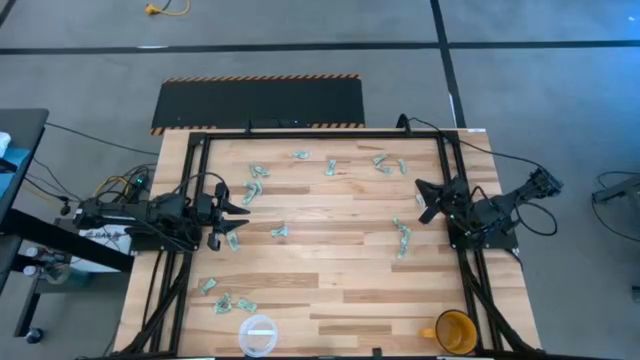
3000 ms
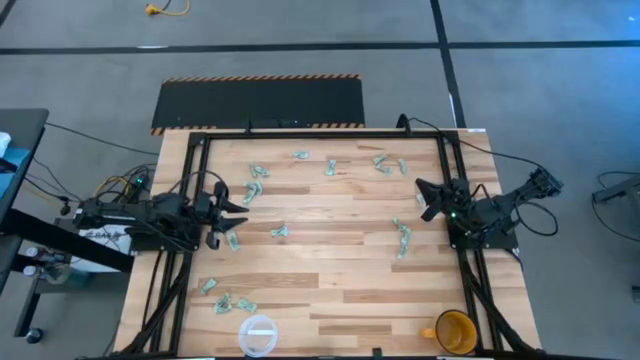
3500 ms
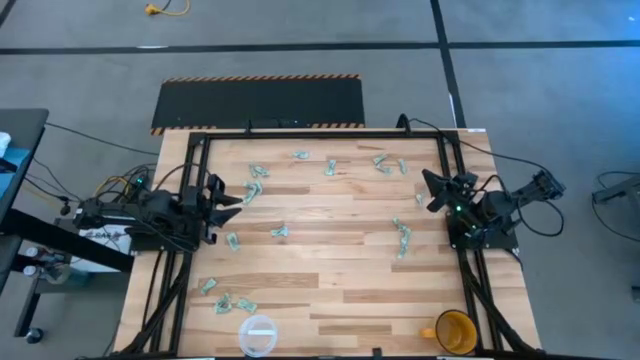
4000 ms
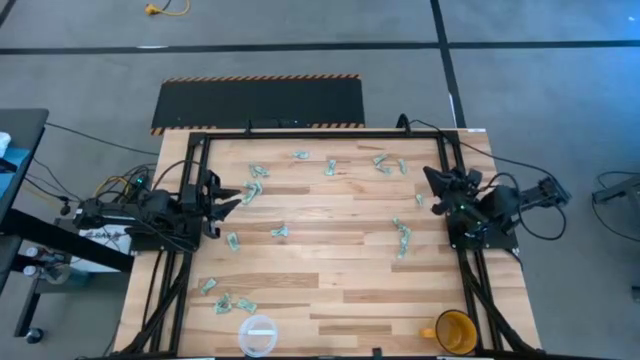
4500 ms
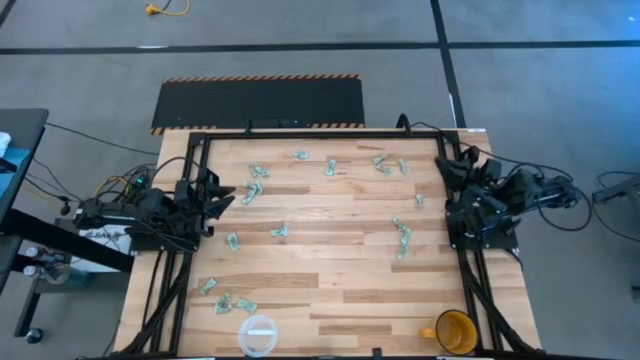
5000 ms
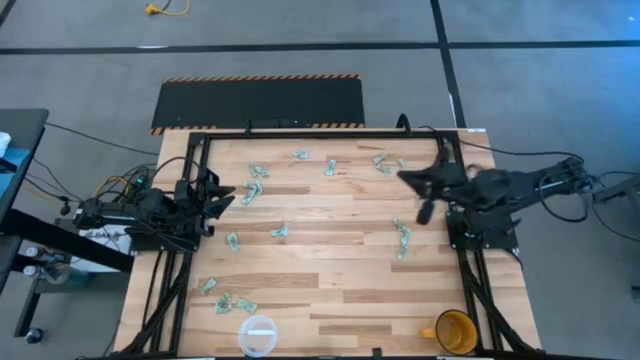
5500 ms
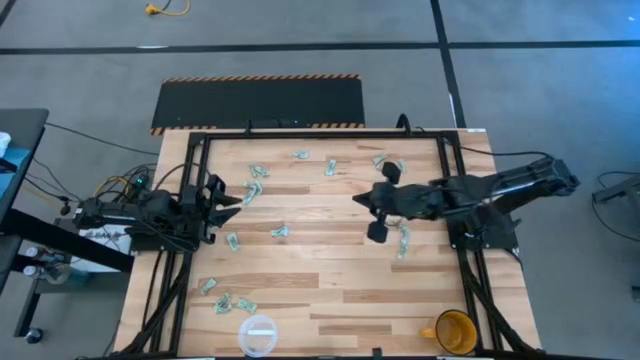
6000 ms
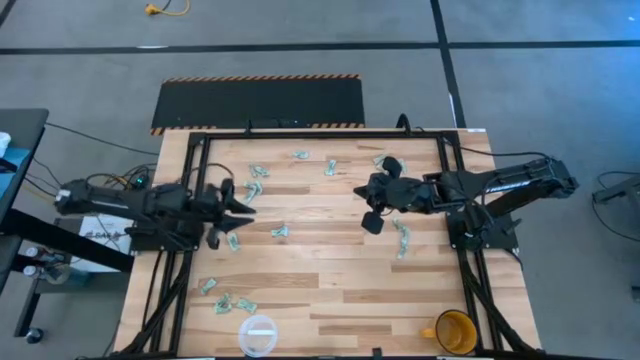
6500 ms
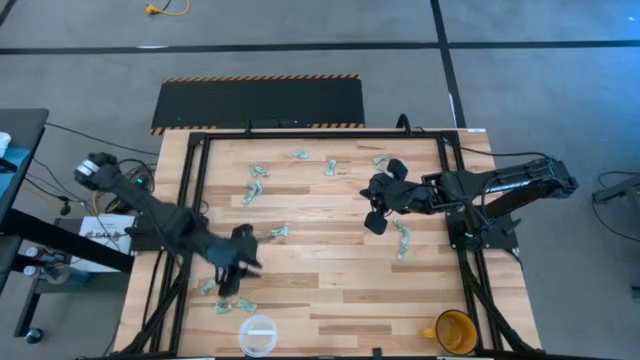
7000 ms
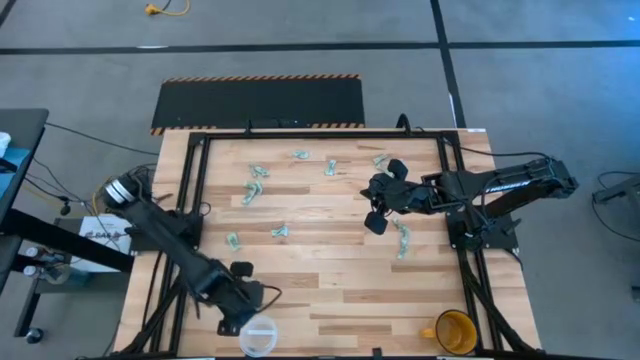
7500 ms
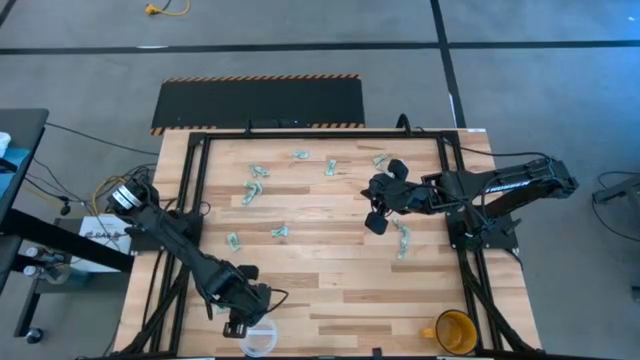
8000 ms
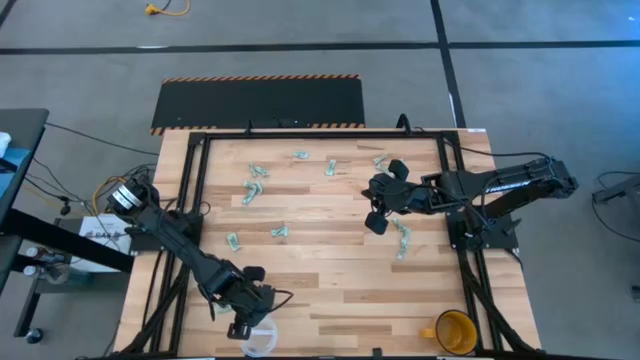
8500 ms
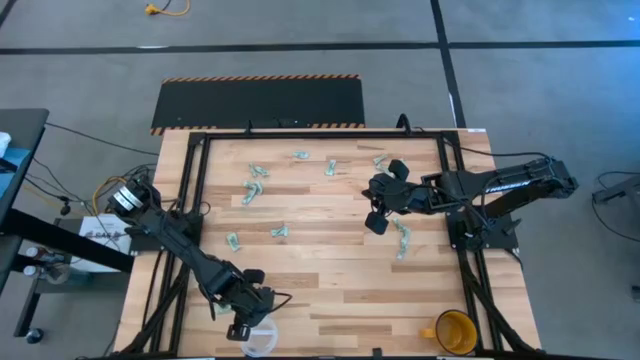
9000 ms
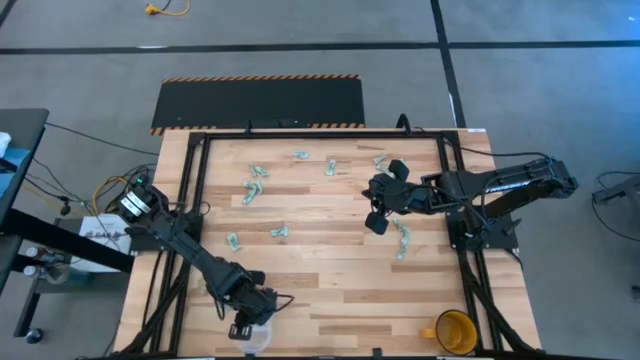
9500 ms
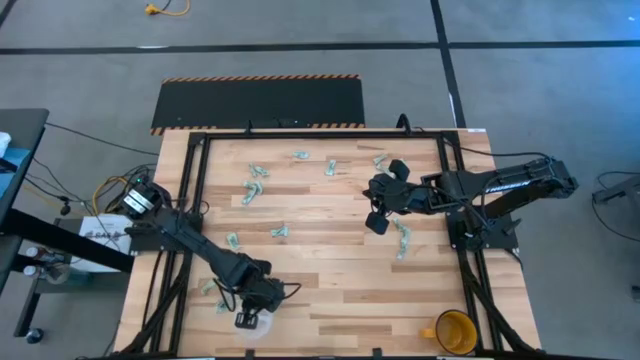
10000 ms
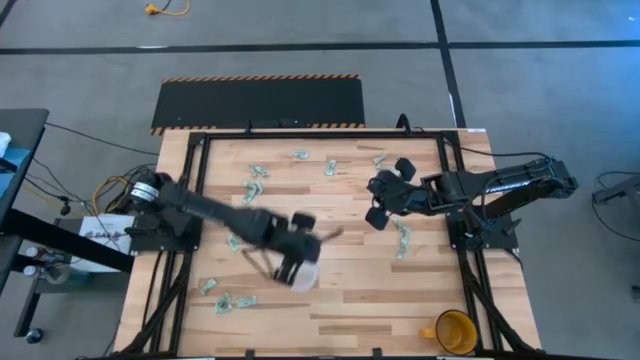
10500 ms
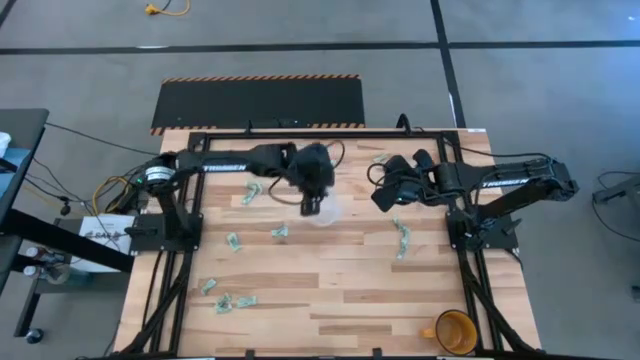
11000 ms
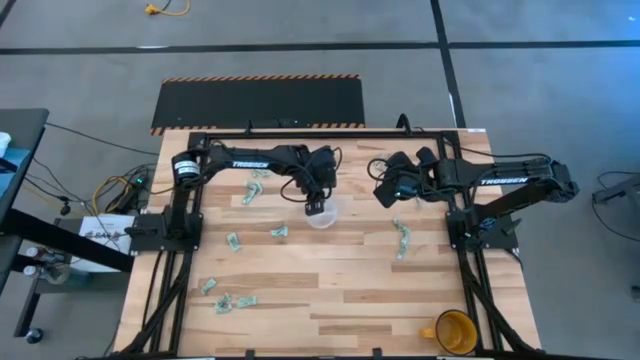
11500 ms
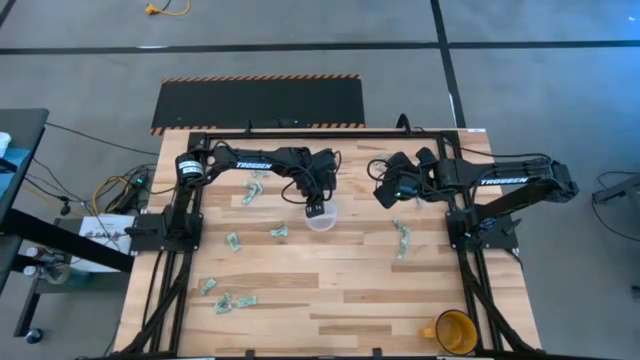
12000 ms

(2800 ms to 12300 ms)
Task: Pick and place Stevia / Truvia into bins
Move the transparent container to the center of the table

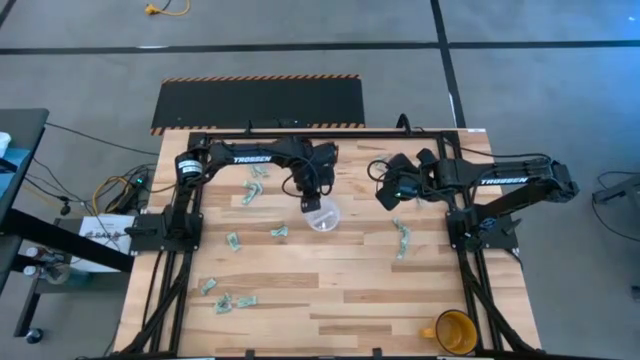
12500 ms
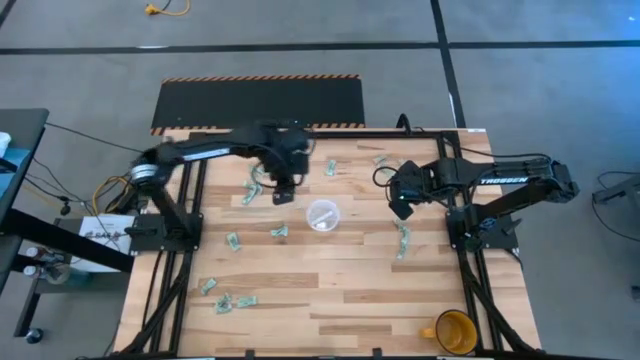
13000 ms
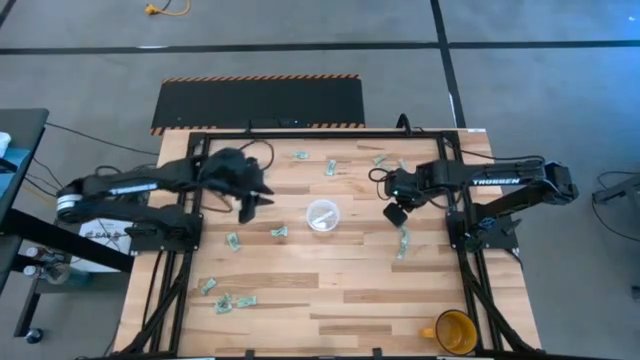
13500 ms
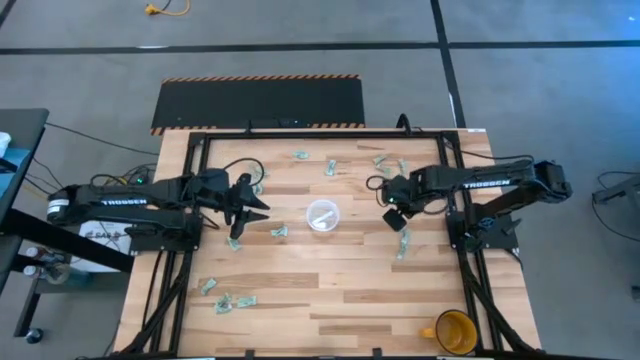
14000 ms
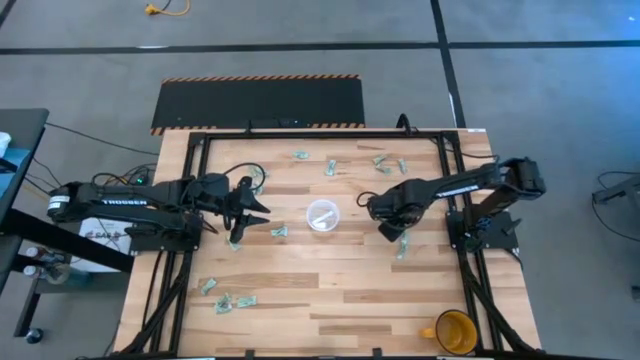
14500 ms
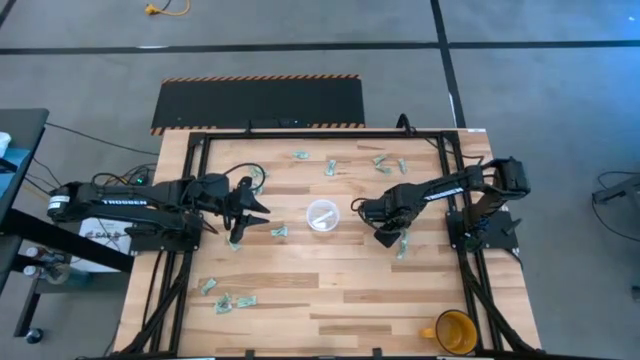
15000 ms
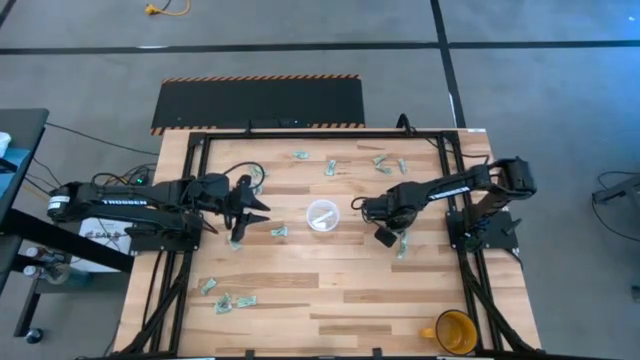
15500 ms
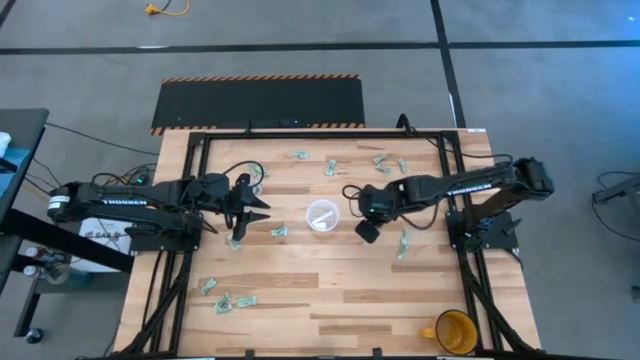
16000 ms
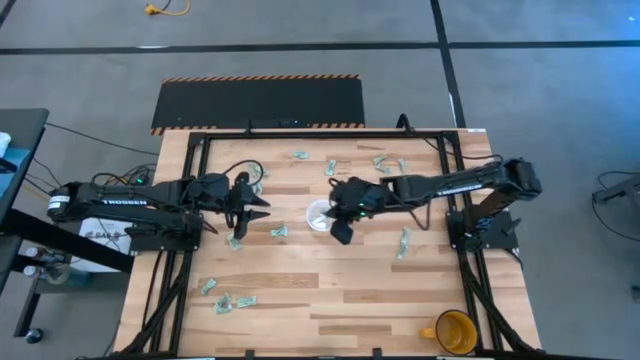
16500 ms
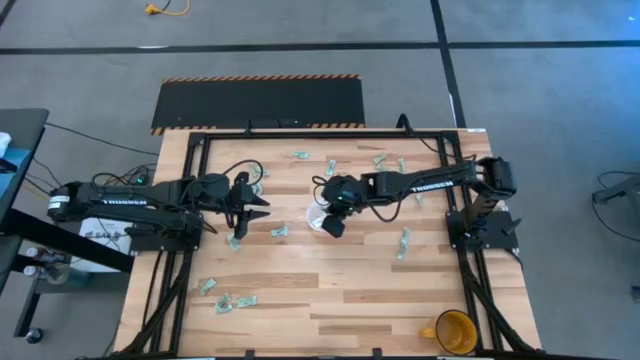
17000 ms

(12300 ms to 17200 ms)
Put the green stevia packet into the transparent container

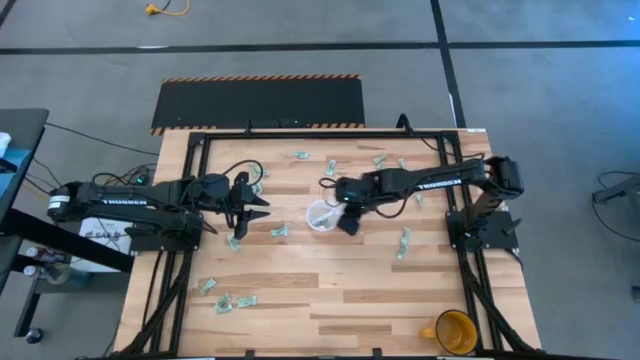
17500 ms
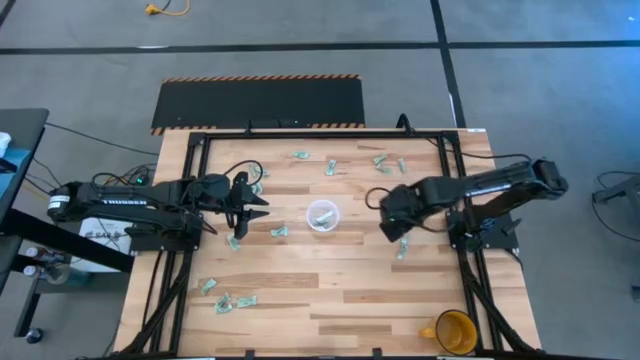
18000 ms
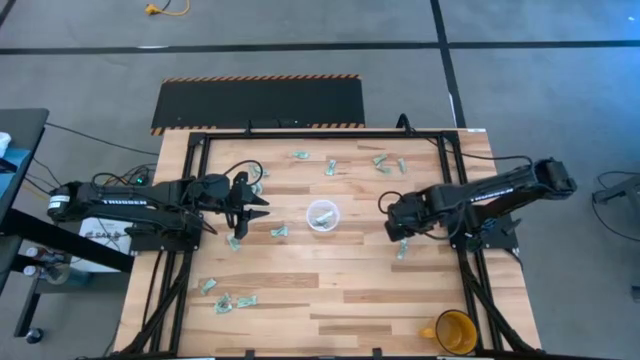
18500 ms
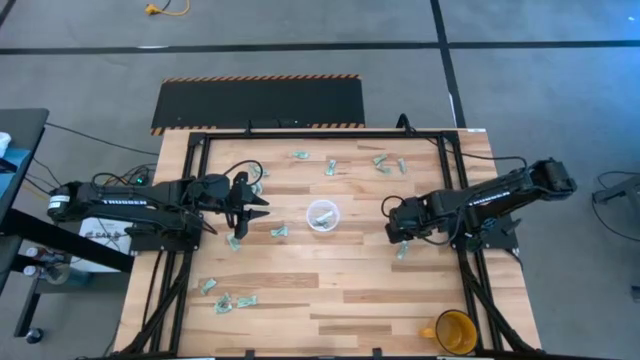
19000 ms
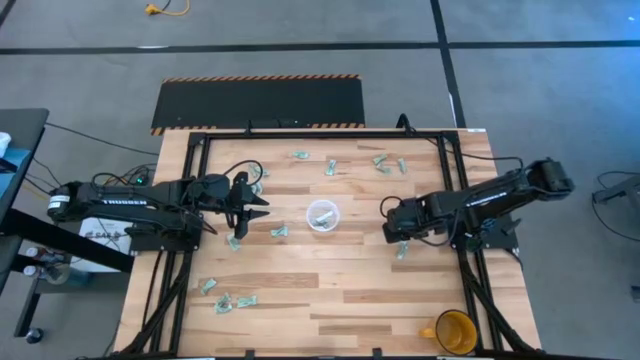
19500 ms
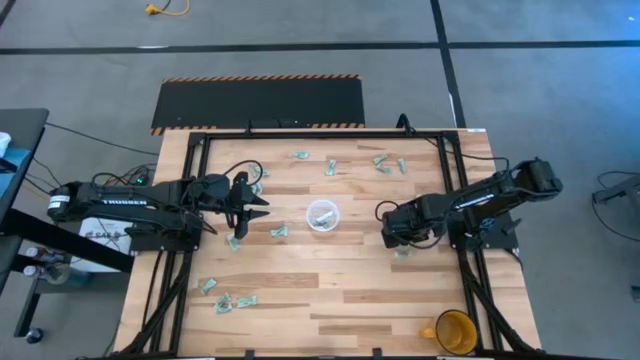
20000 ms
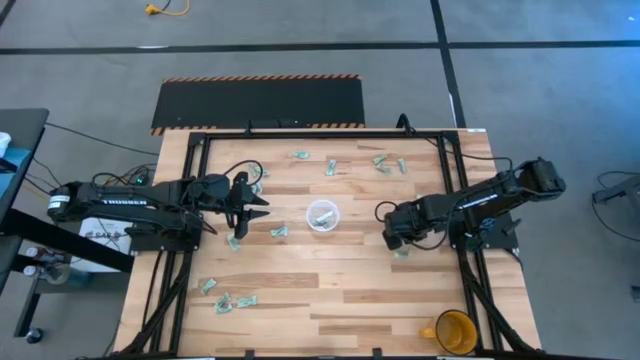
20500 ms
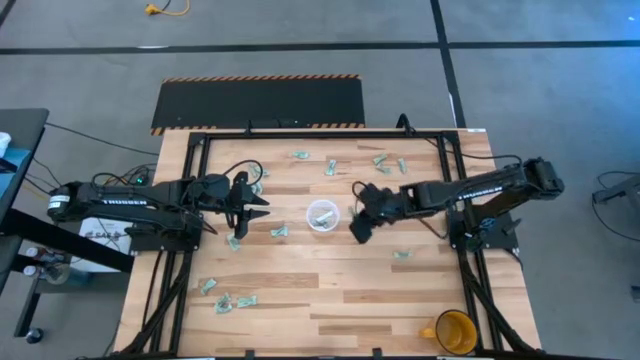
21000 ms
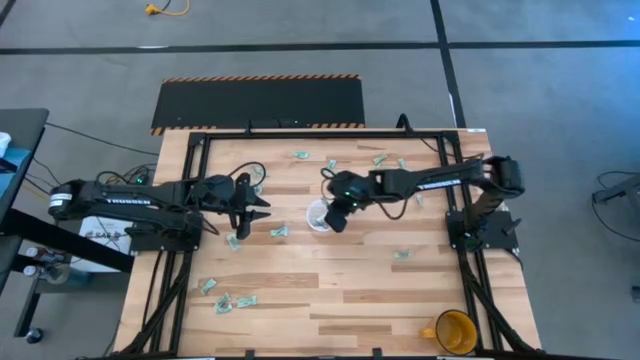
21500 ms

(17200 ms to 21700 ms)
Put the green stevia packet into the transparent container

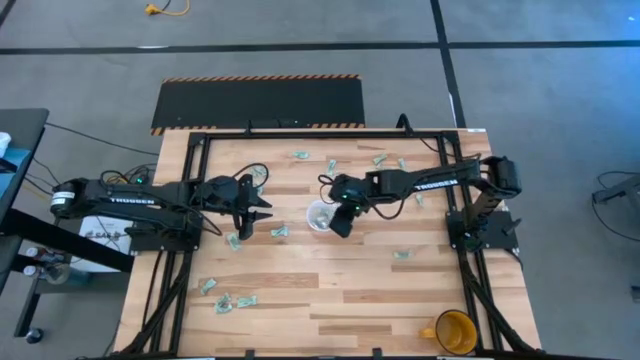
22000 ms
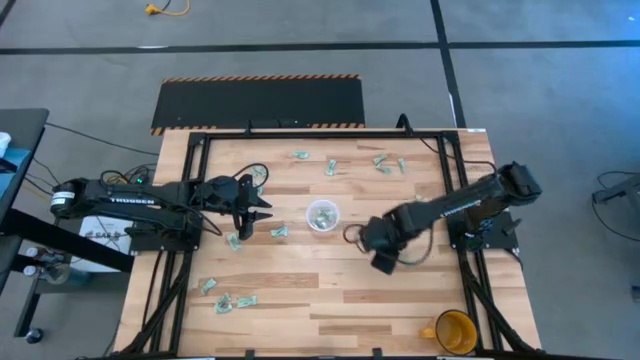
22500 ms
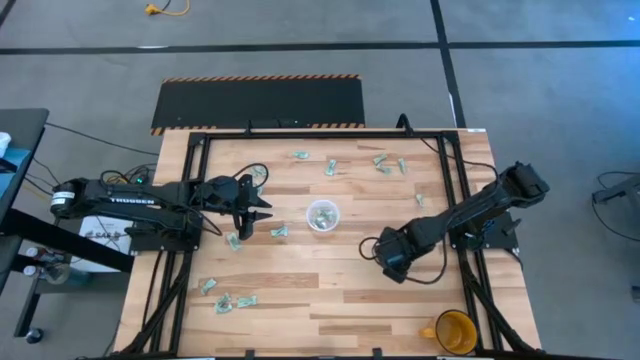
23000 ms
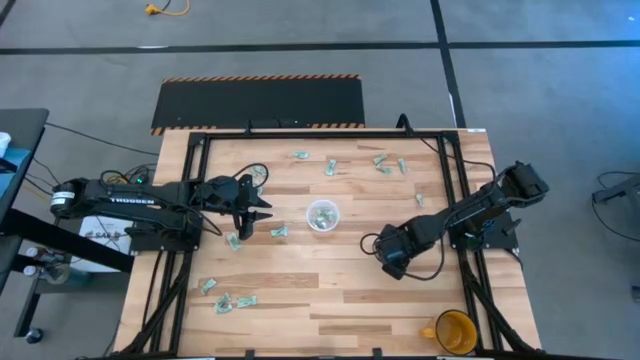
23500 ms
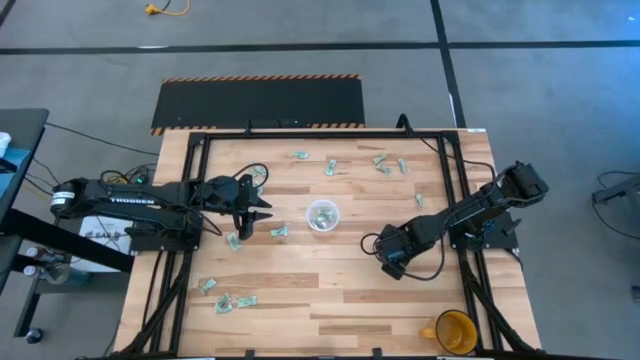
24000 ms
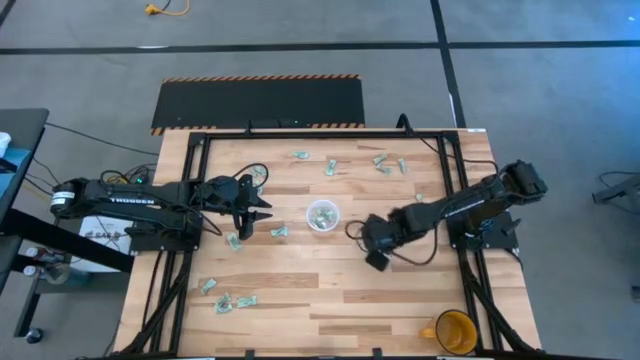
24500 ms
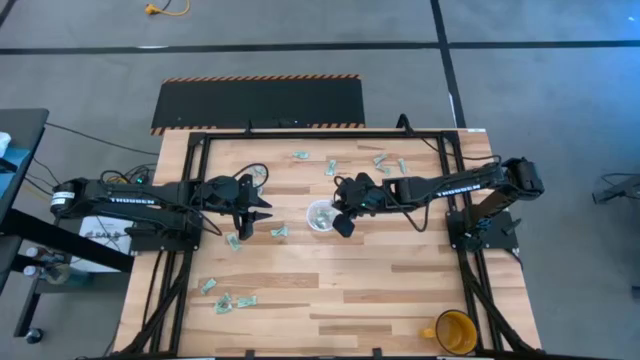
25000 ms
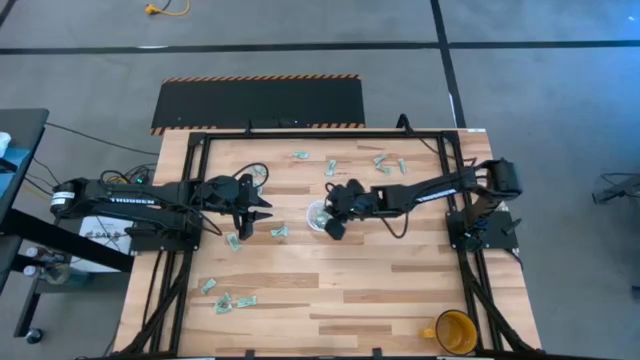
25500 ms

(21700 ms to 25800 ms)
Put the green stevia packet into the transparent container
